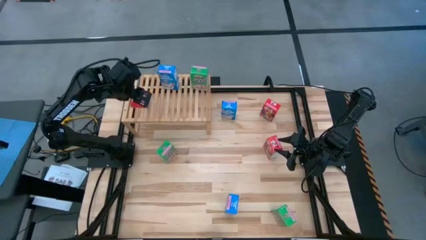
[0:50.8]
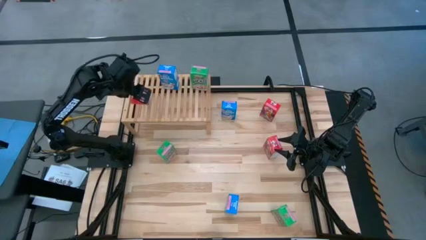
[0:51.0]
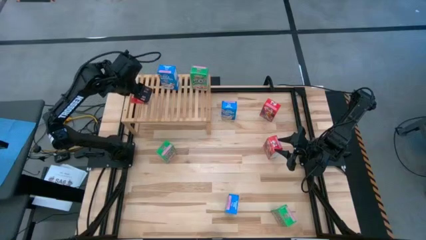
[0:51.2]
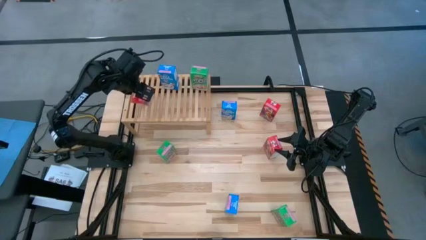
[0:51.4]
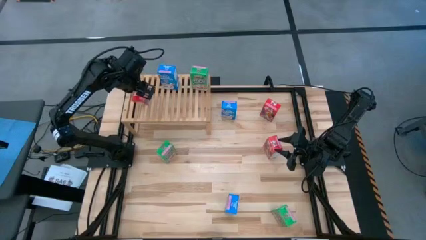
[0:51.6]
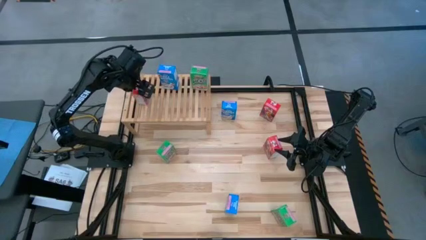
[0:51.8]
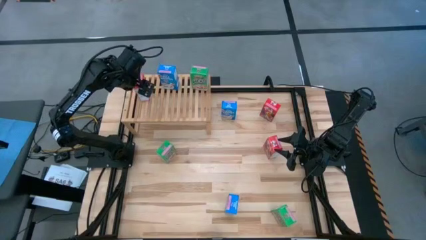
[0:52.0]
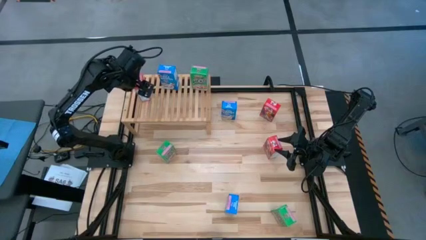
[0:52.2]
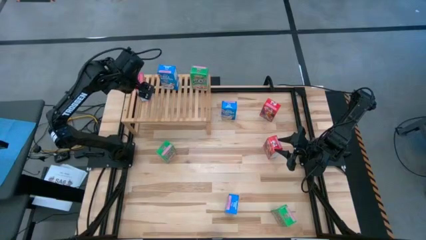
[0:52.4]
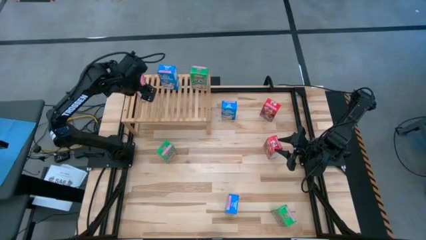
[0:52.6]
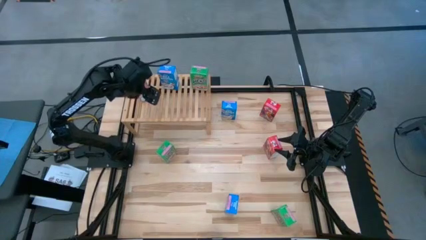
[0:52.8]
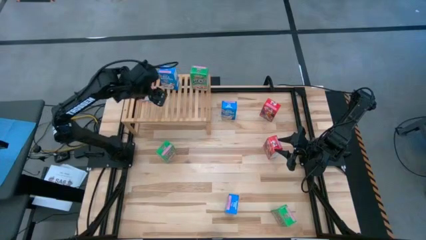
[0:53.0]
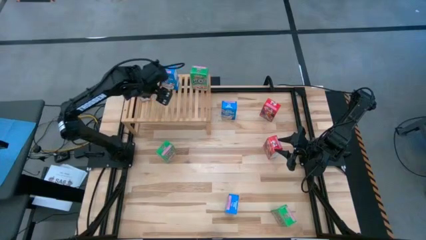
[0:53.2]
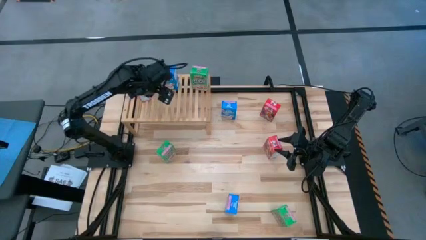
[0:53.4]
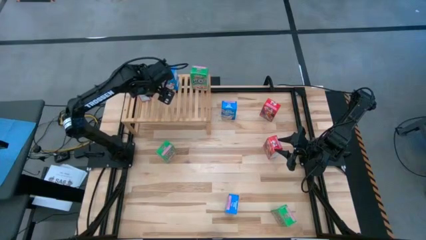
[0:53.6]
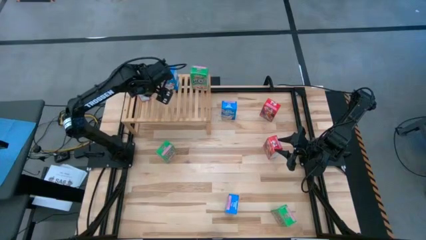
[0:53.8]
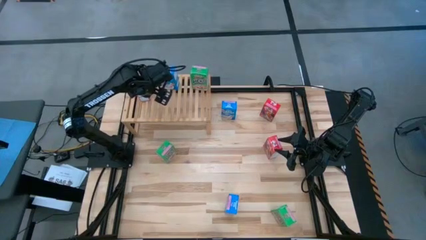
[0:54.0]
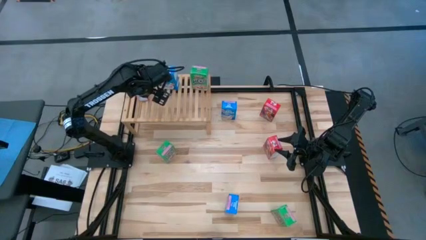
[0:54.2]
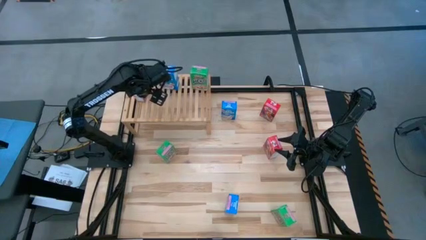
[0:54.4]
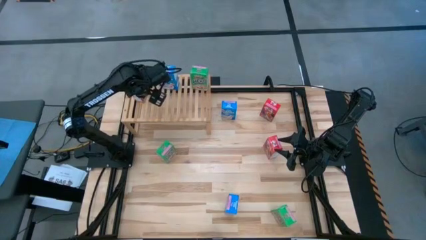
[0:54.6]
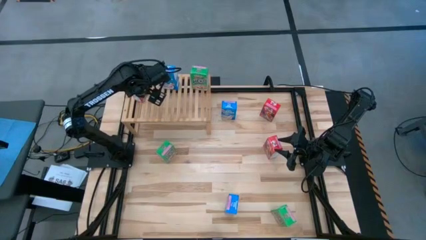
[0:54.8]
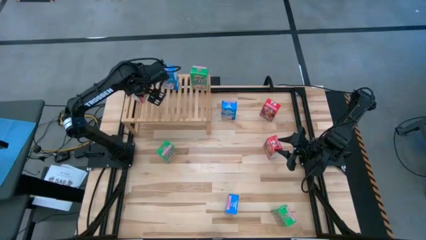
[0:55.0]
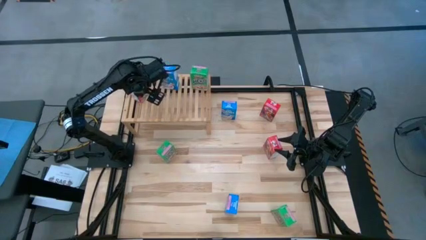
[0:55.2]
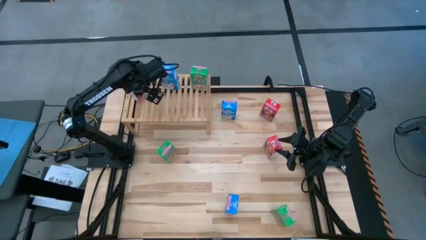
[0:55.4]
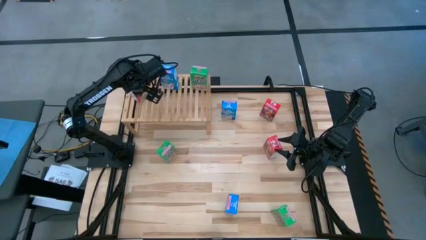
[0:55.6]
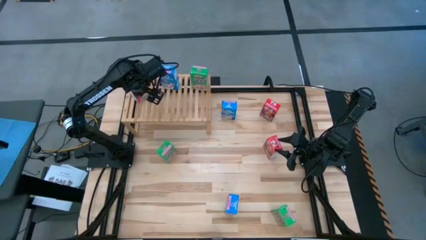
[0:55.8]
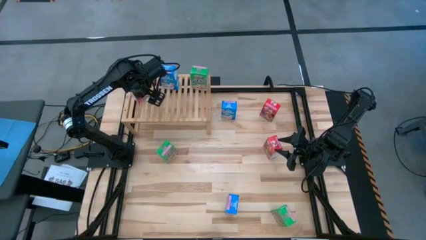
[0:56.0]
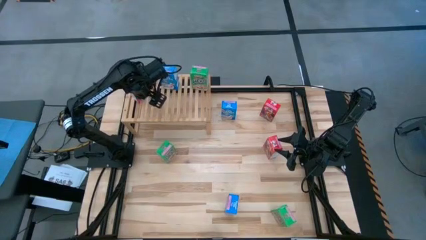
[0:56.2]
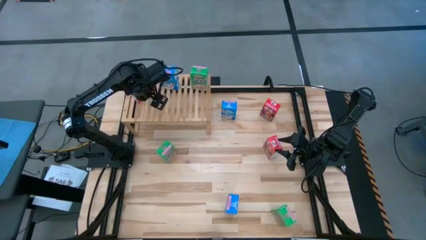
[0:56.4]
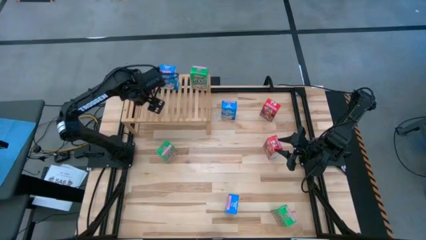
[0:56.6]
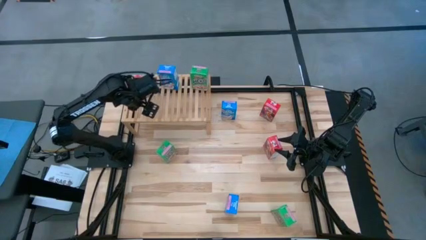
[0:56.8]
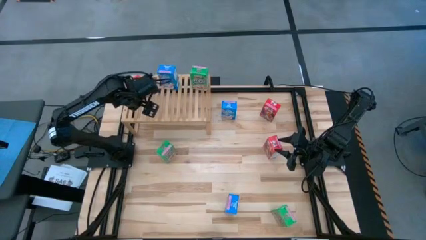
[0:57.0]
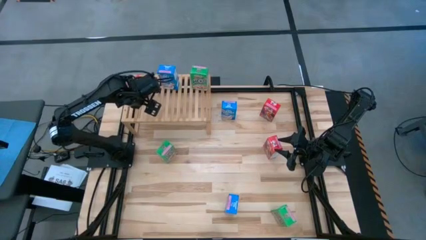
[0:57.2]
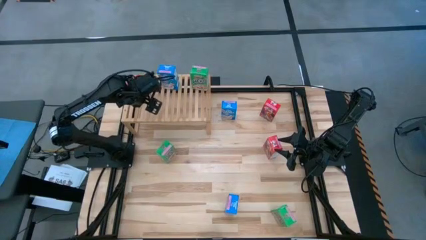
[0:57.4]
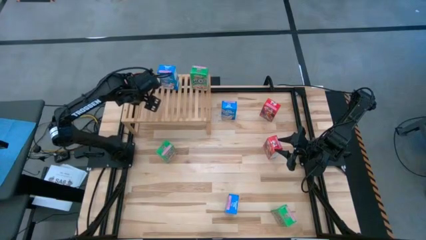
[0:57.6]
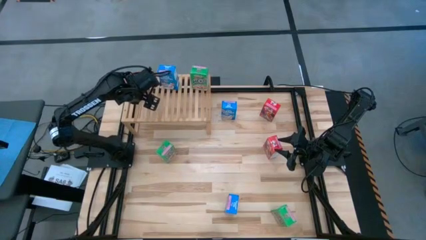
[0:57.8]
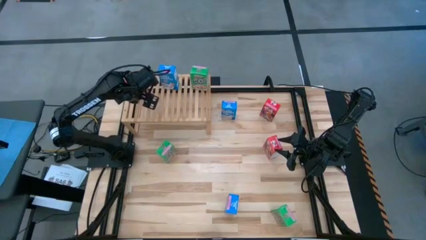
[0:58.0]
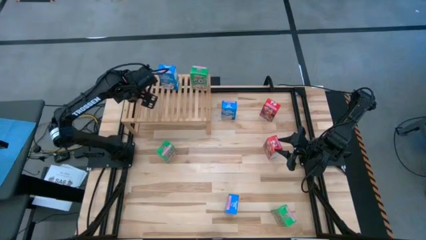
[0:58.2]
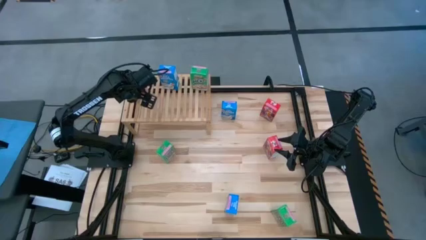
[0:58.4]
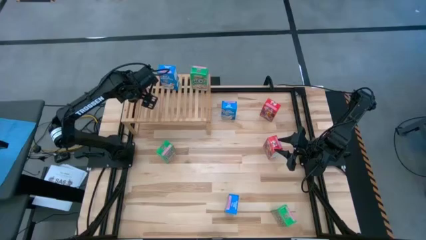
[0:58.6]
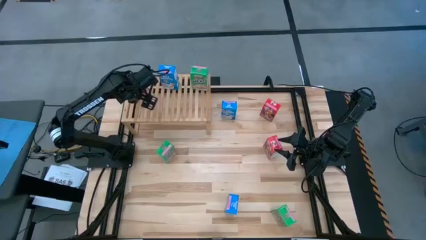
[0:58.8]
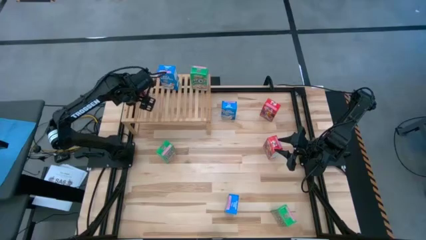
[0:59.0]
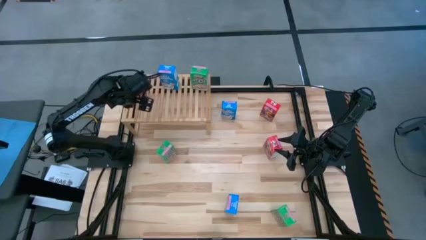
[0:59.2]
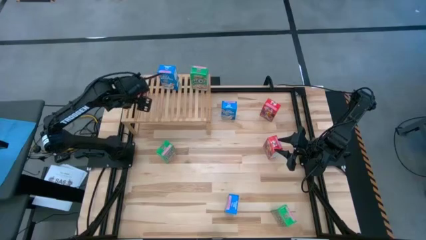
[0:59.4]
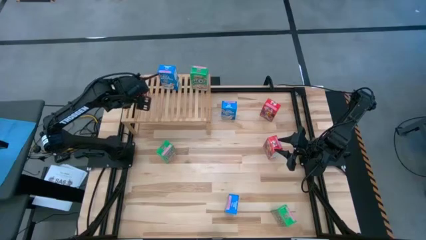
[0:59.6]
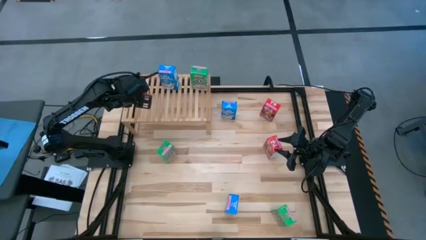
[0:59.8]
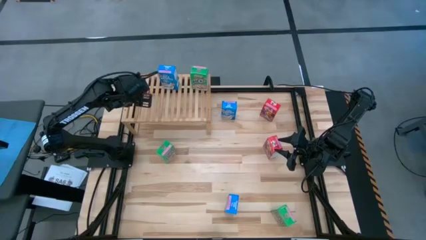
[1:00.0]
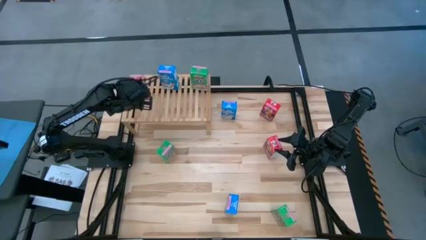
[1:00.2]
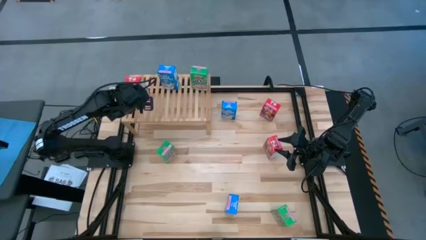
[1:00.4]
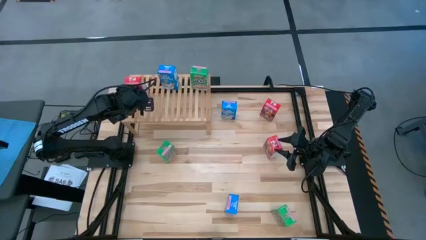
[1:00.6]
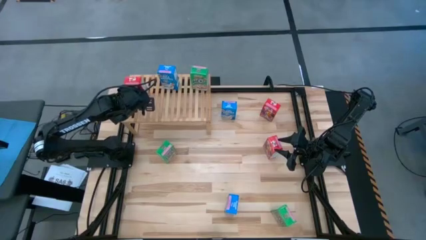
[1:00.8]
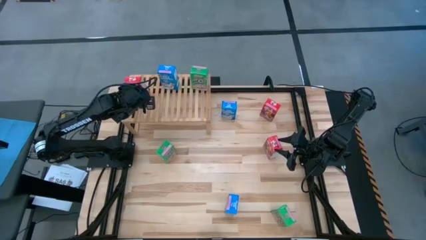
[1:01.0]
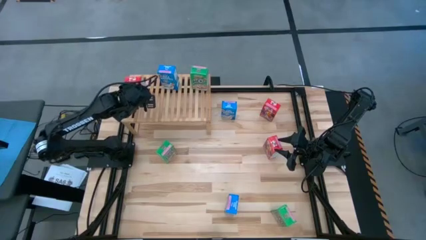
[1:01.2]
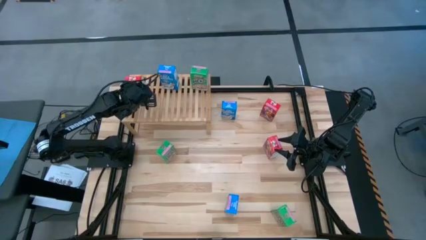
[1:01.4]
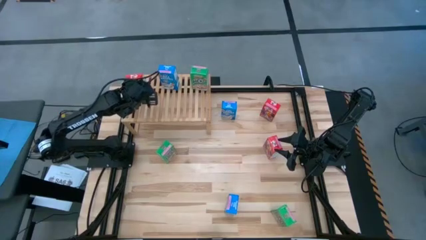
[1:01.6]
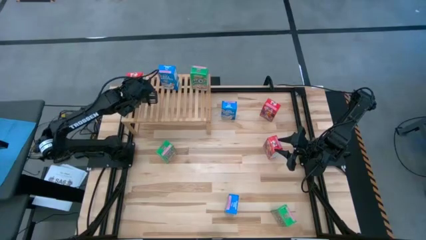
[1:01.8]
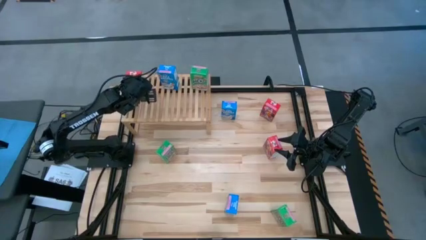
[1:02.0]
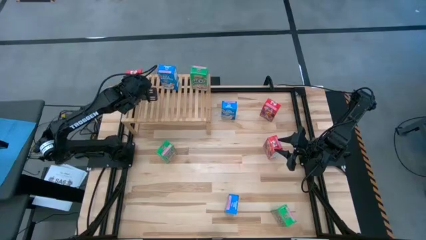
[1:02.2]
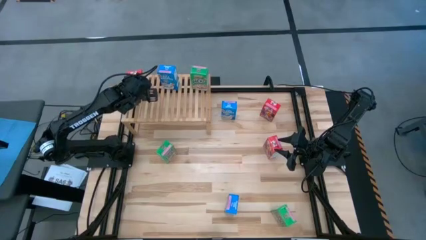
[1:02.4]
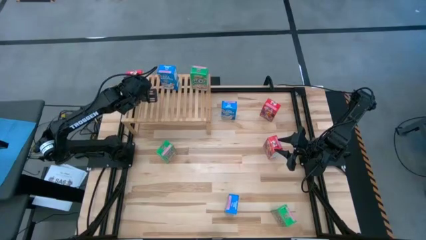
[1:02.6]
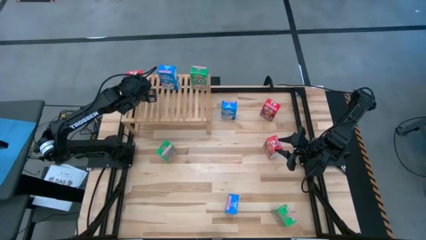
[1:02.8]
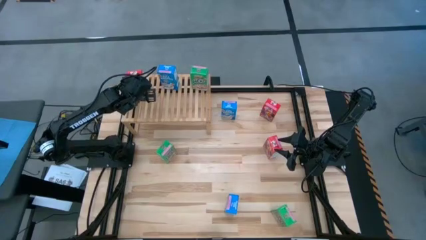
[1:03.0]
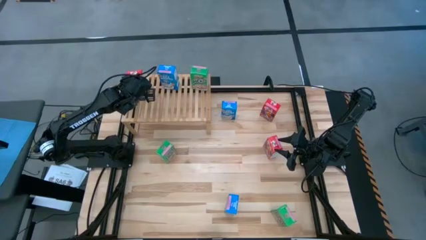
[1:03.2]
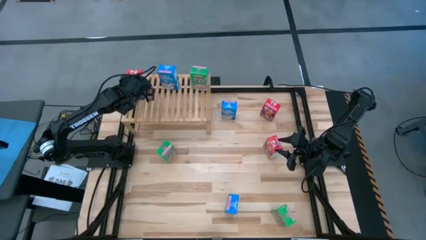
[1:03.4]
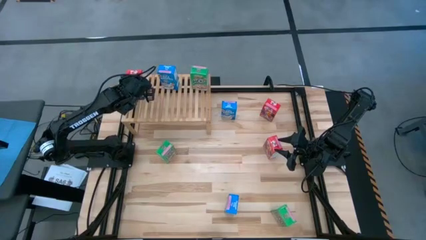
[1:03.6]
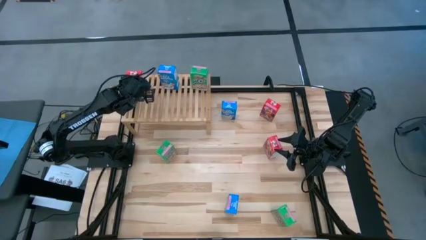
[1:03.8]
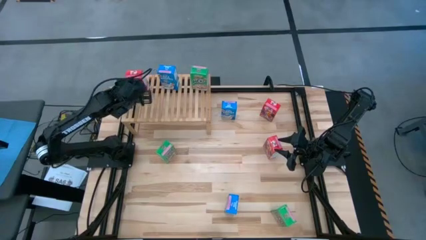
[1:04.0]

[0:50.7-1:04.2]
Task: Stack cereal on shelf
Put the bottom red cereal box on the shelf
